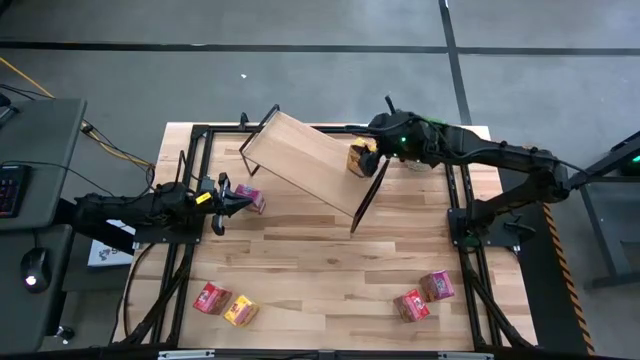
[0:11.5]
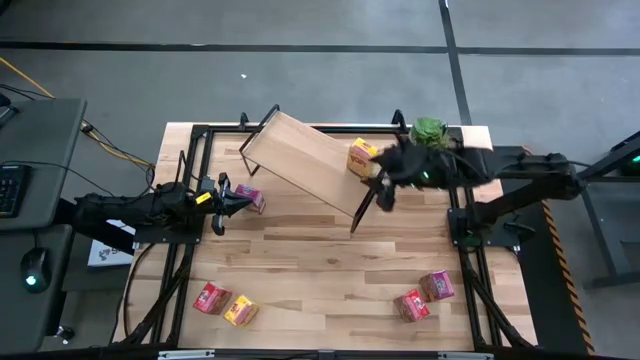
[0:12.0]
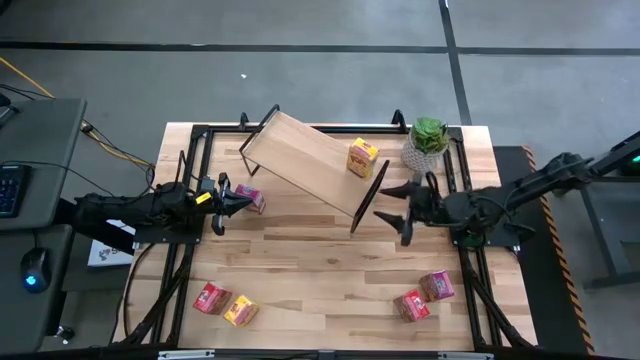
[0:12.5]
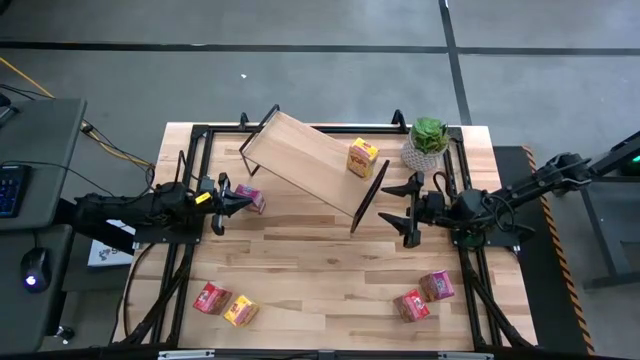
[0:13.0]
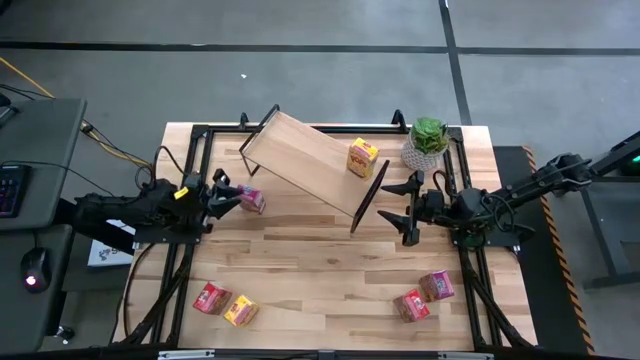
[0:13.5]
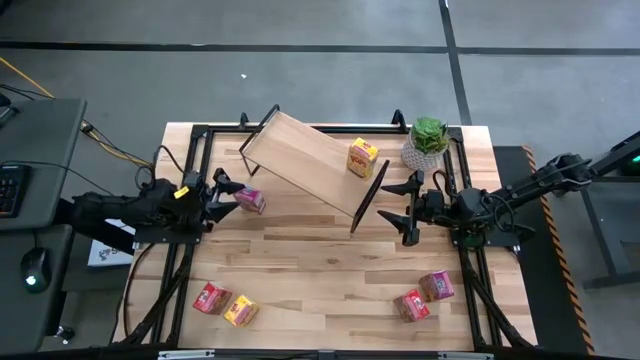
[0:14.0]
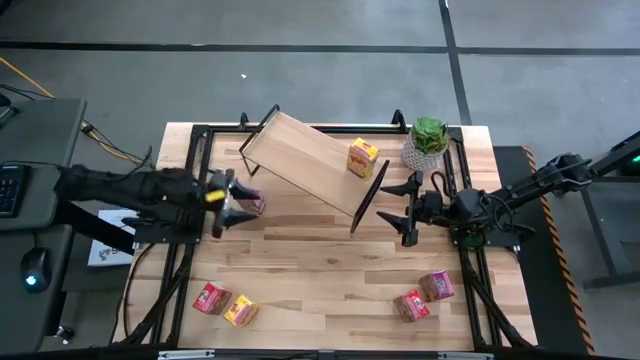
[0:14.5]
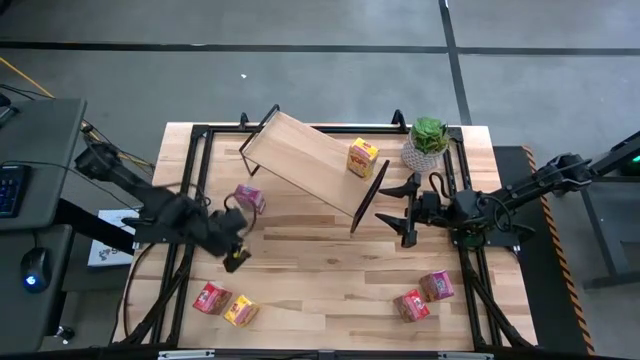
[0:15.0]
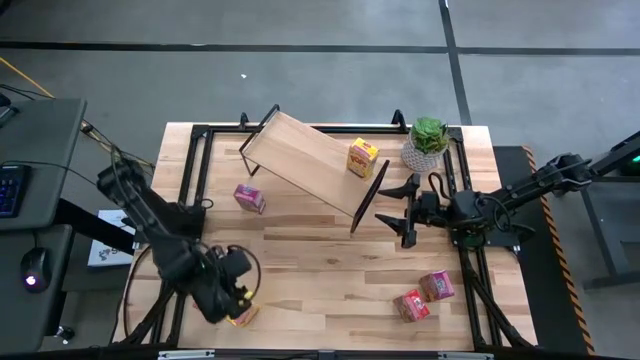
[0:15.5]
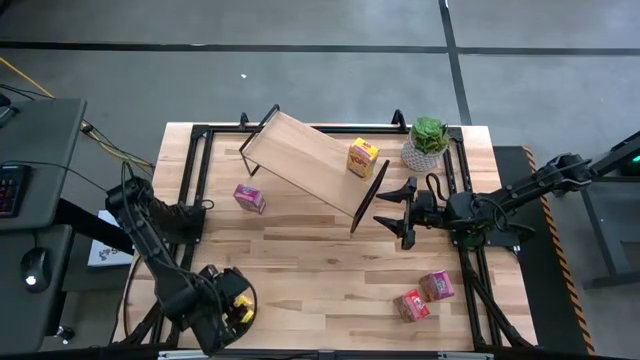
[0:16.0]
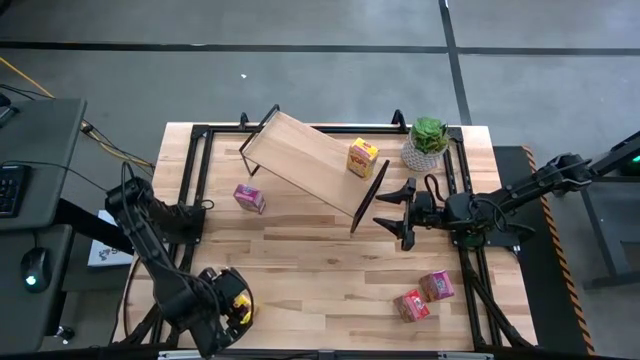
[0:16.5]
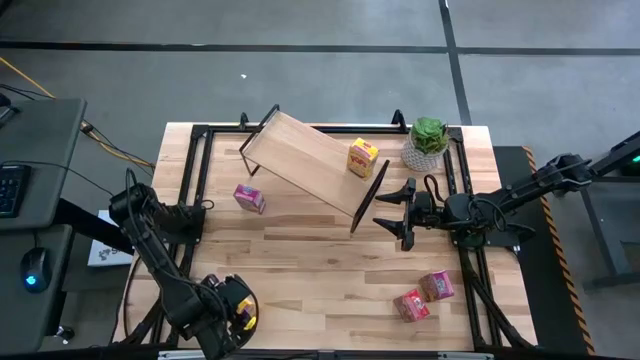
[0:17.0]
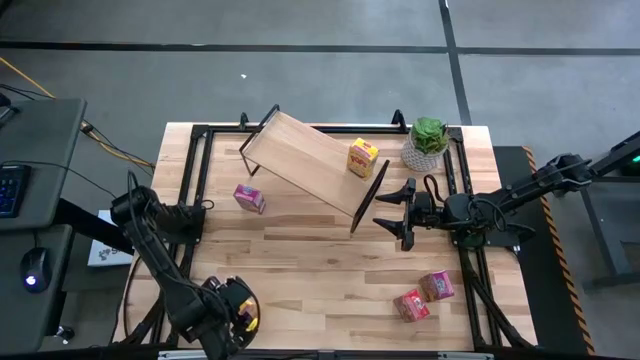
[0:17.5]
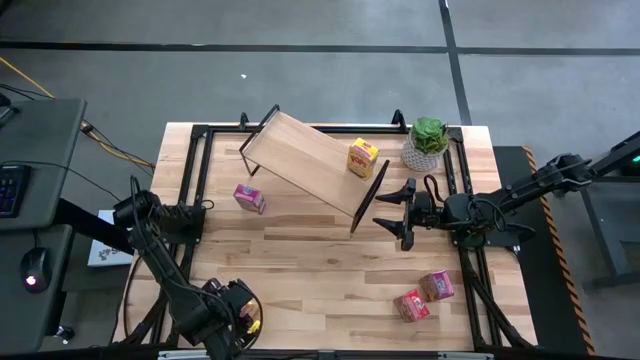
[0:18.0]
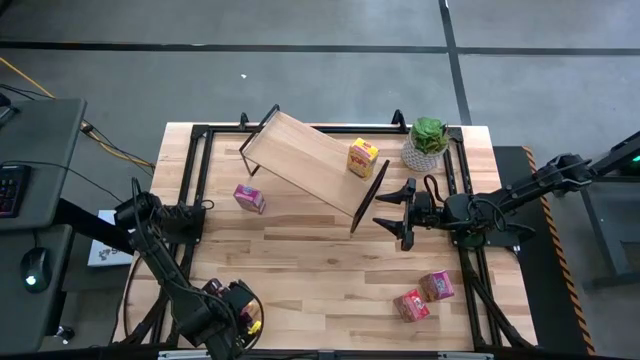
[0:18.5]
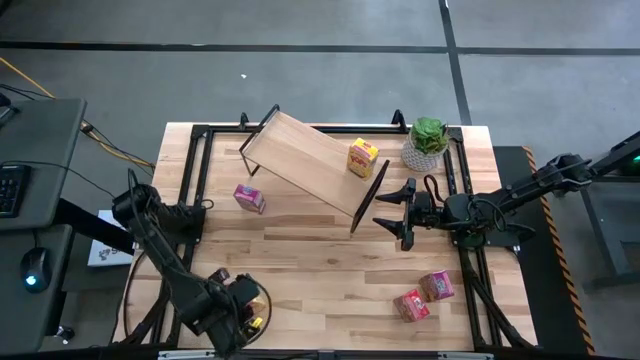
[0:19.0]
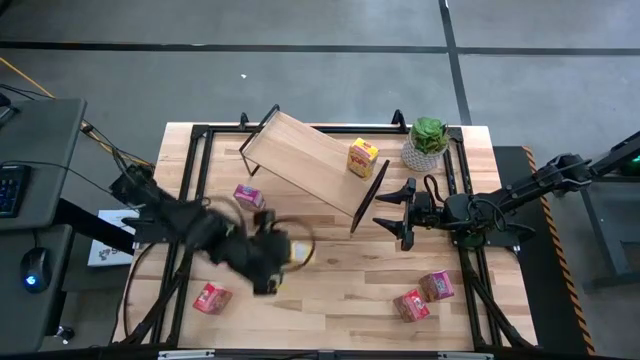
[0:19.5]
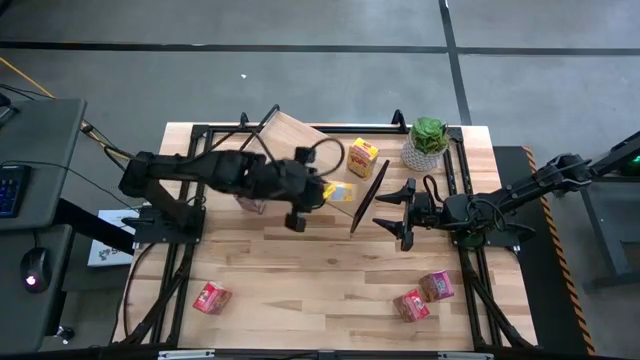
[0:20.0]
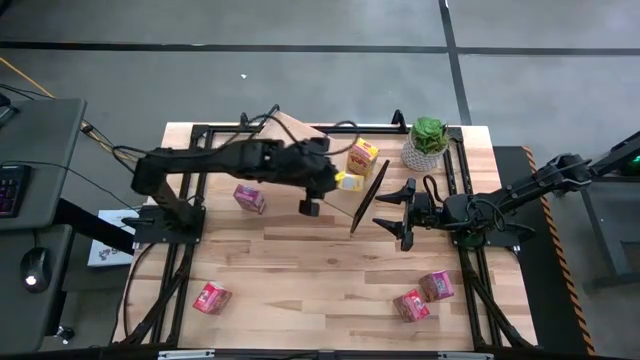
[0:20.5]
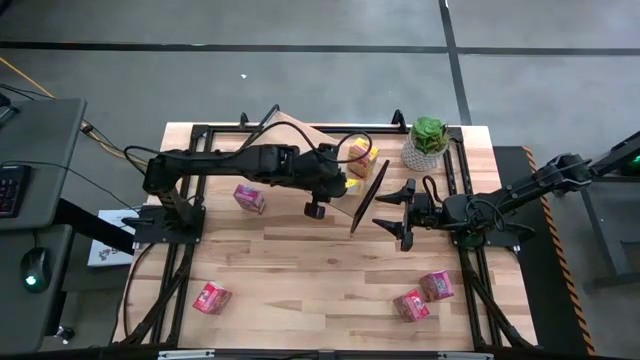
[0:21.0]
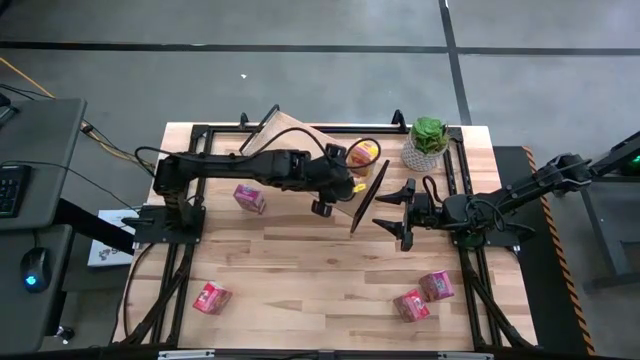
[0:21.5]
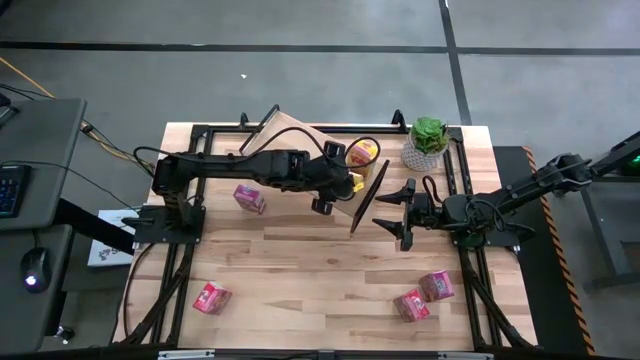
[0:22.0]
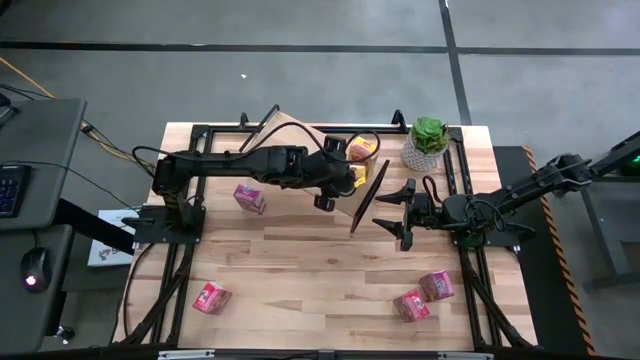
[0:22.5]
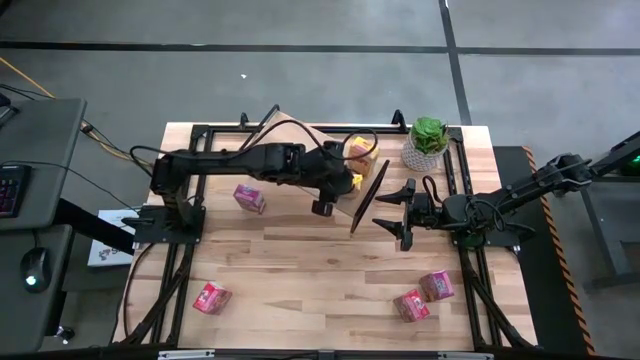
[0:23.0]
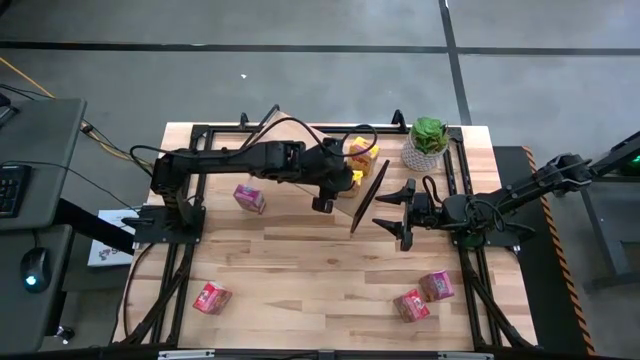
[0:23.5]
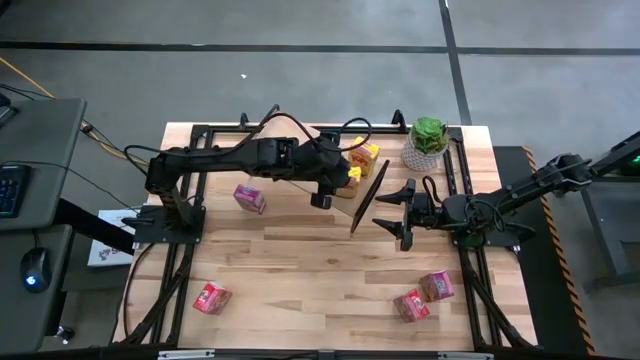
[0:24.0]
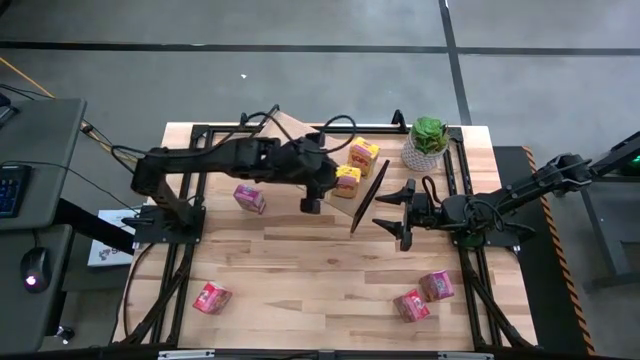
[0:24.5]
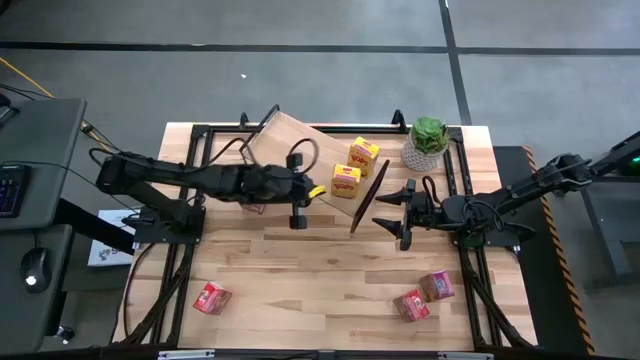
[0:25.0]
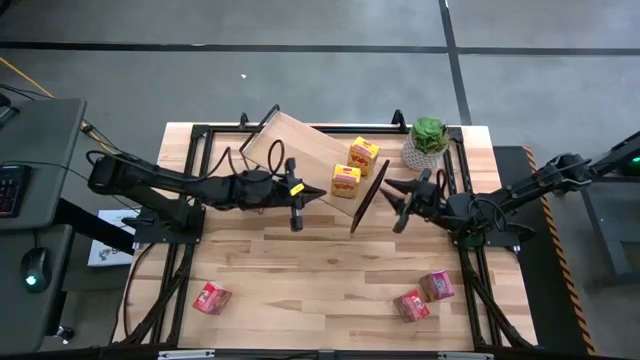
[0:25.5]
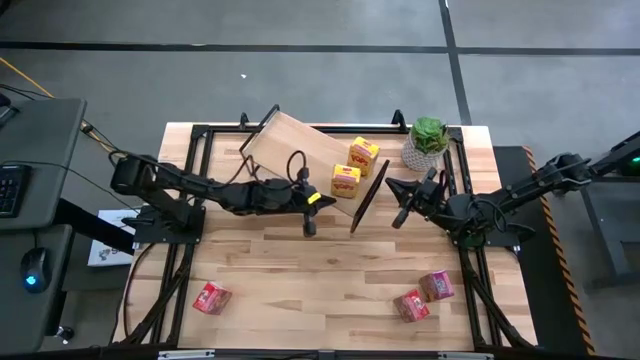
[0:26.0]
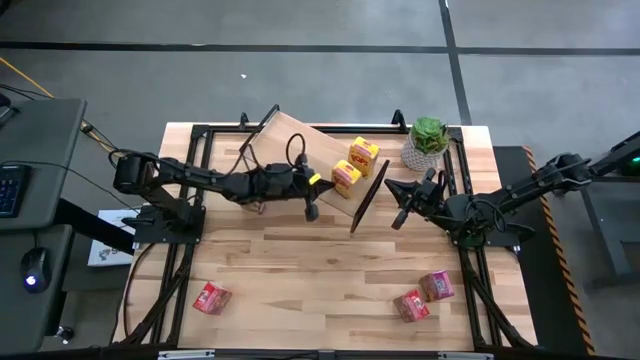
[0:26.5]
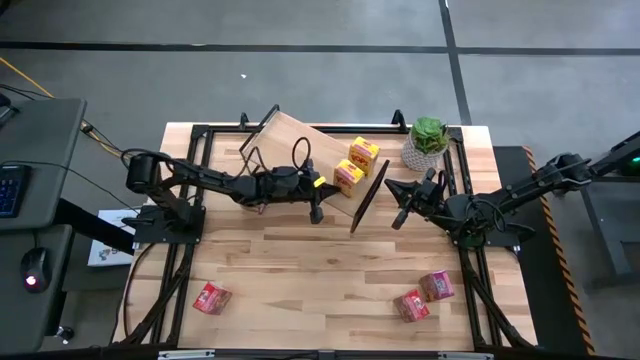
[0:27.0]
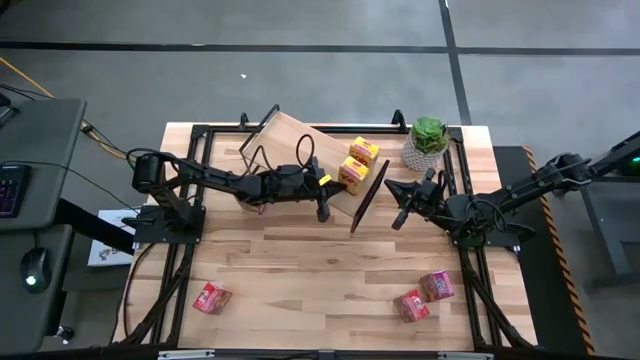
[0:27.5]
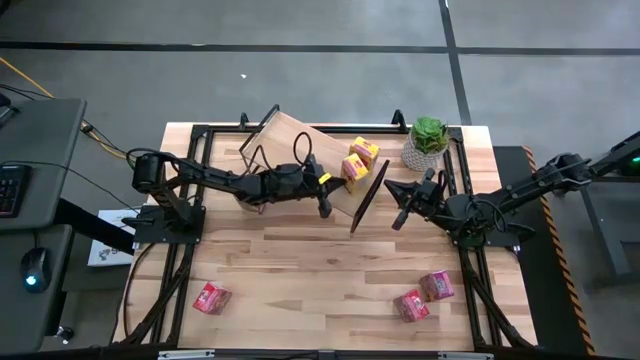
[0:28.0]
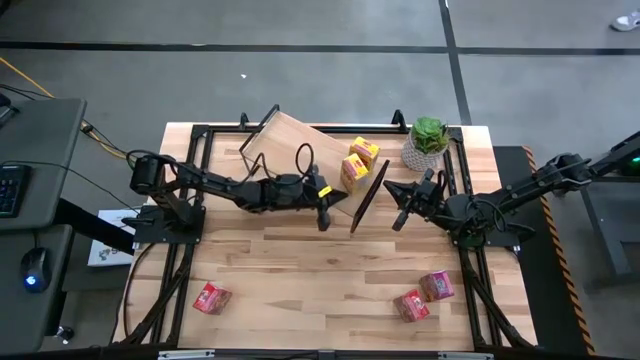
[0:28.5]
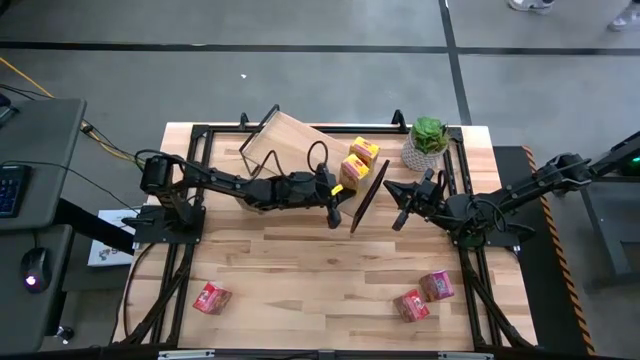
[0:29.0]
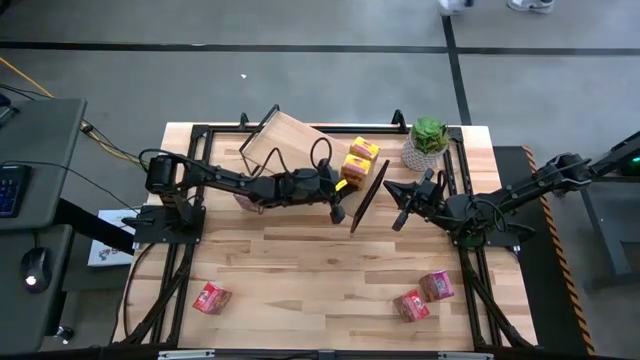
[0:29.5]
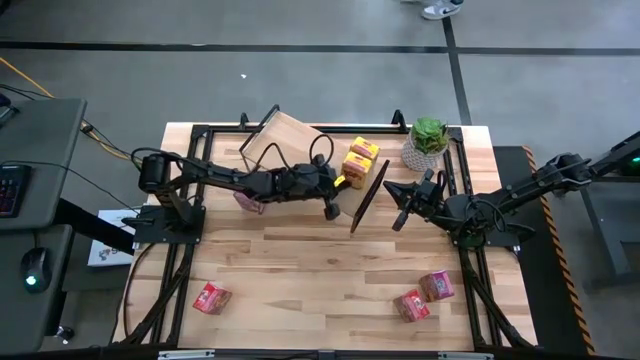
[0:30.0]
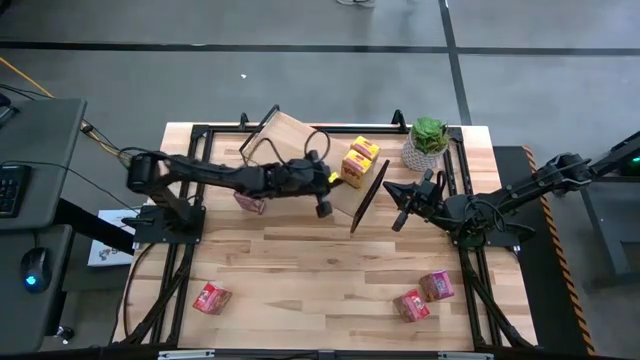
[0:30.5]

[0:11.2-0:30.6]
Task: Stack cereal on shelf
Put the yellow cereal box aligned with the other yellow cereal box on the shelf
